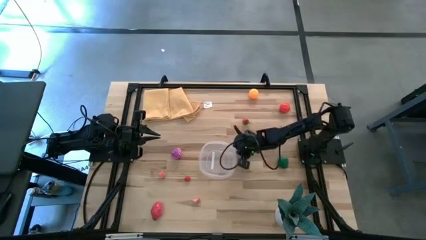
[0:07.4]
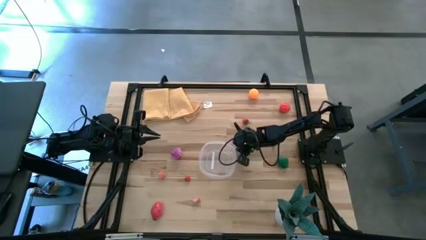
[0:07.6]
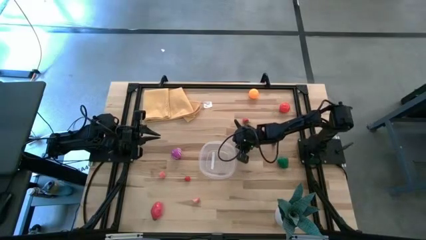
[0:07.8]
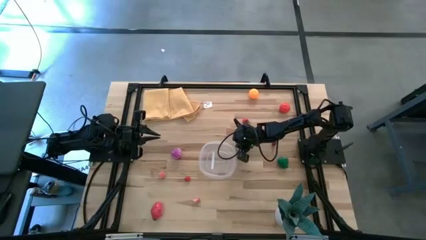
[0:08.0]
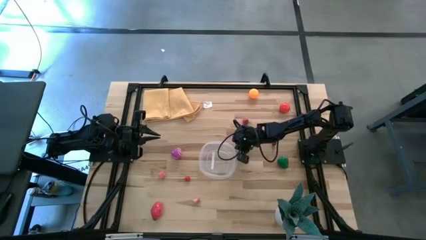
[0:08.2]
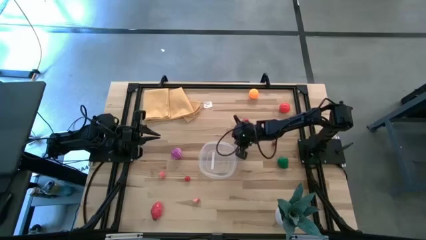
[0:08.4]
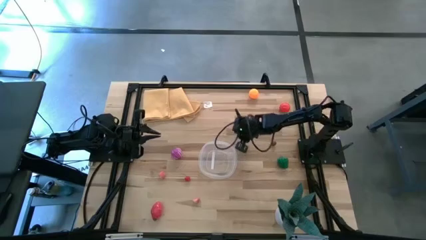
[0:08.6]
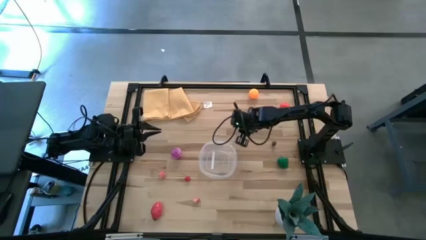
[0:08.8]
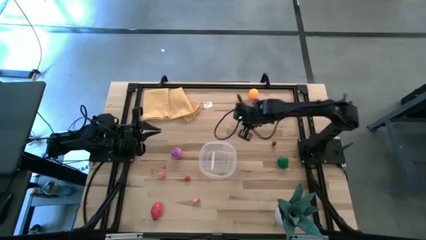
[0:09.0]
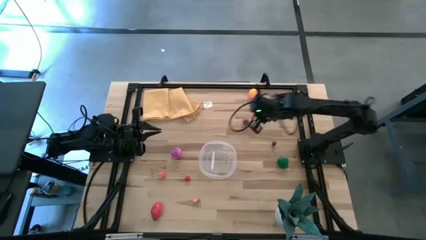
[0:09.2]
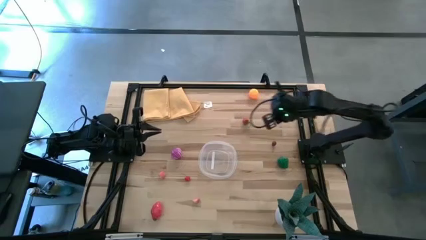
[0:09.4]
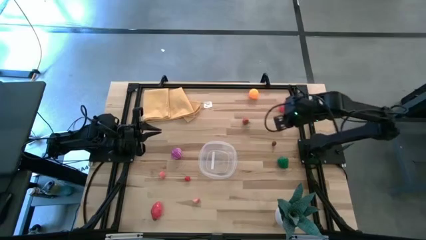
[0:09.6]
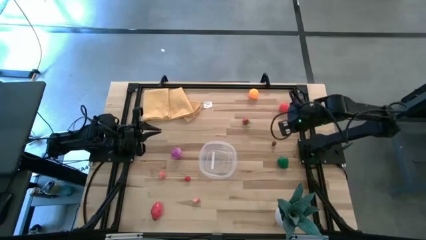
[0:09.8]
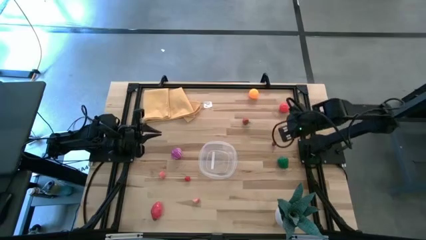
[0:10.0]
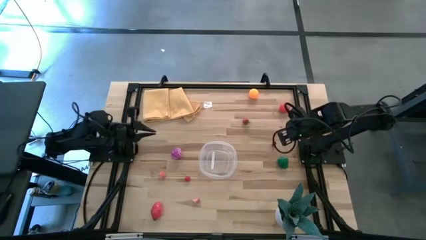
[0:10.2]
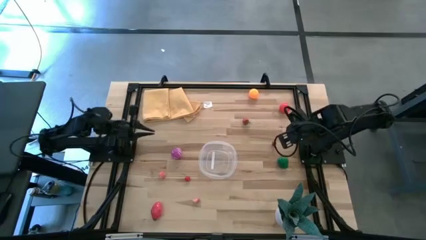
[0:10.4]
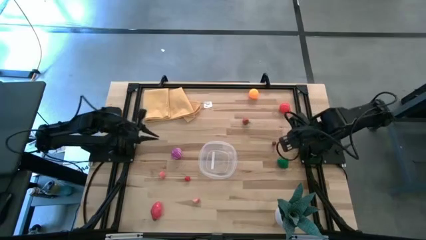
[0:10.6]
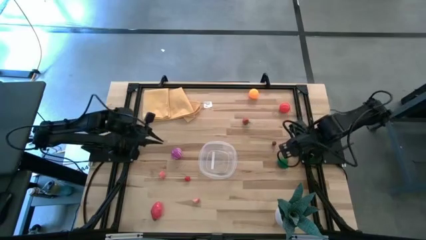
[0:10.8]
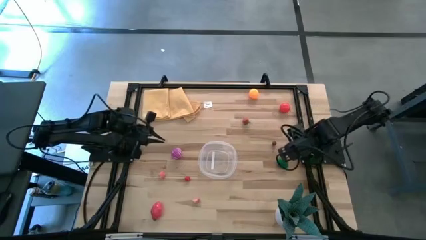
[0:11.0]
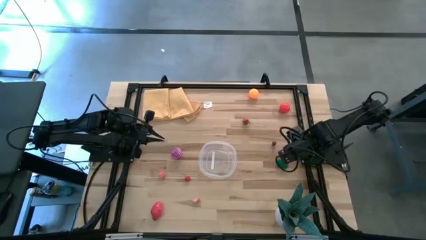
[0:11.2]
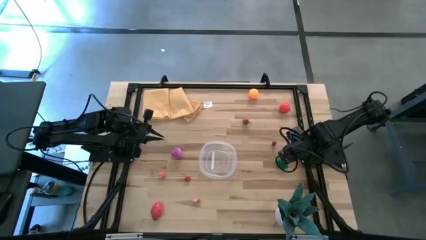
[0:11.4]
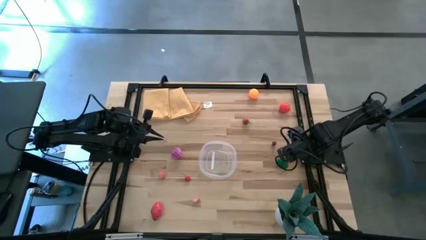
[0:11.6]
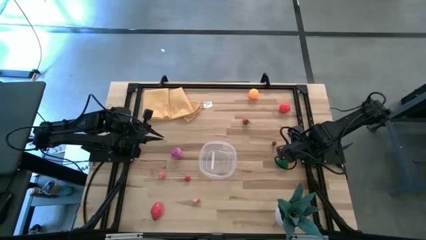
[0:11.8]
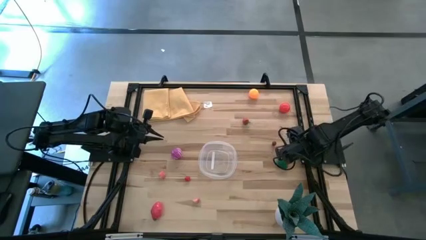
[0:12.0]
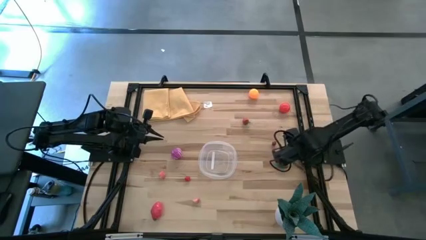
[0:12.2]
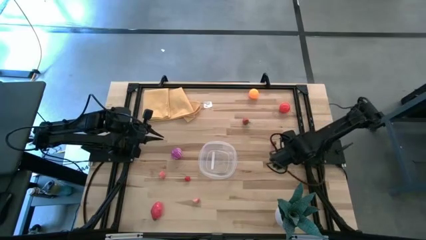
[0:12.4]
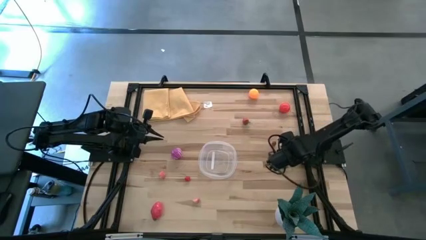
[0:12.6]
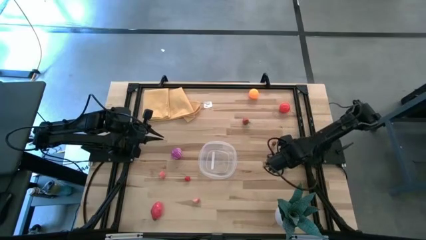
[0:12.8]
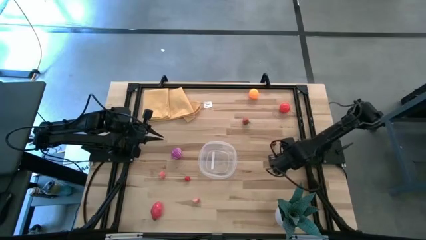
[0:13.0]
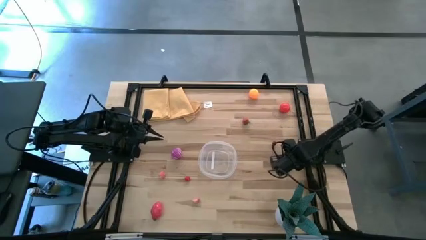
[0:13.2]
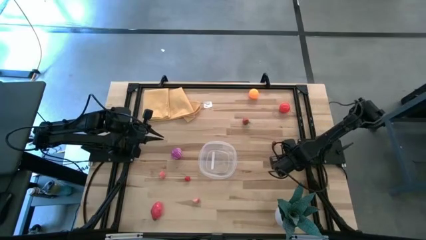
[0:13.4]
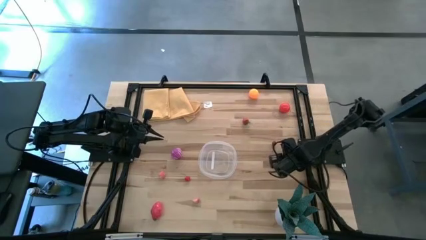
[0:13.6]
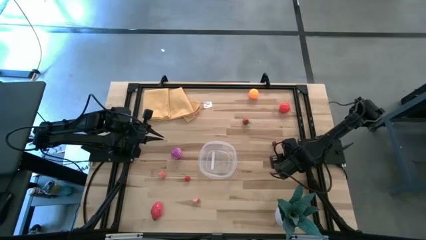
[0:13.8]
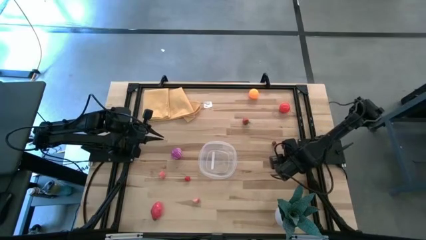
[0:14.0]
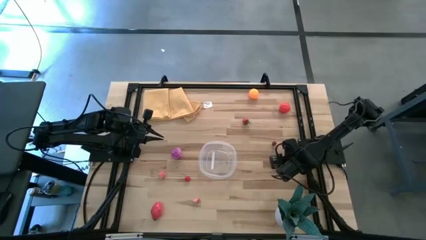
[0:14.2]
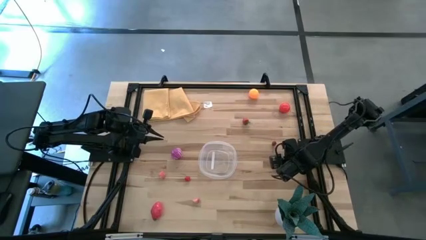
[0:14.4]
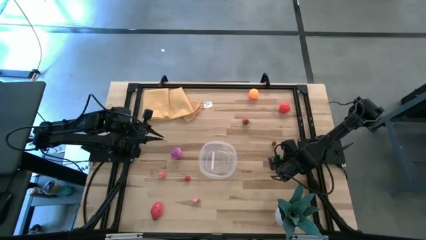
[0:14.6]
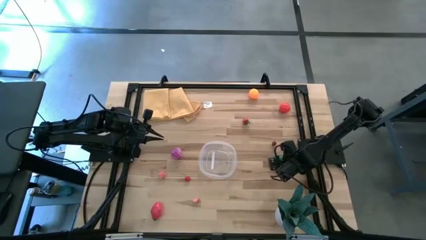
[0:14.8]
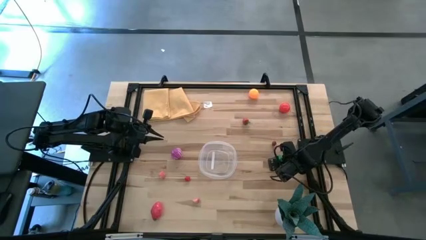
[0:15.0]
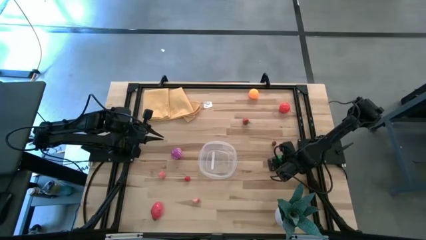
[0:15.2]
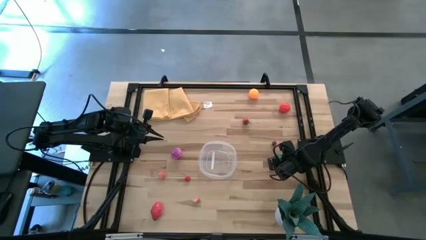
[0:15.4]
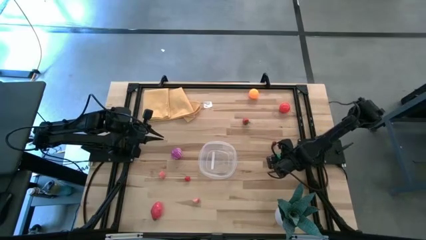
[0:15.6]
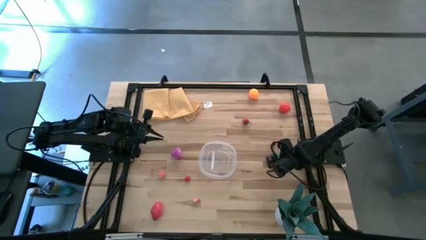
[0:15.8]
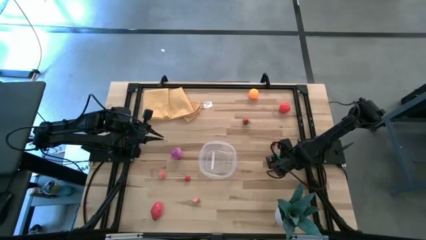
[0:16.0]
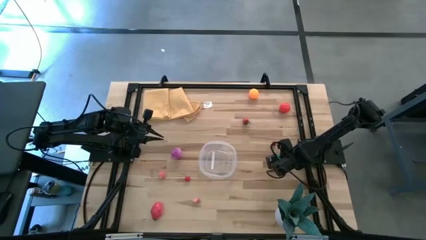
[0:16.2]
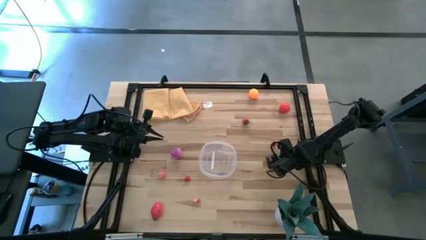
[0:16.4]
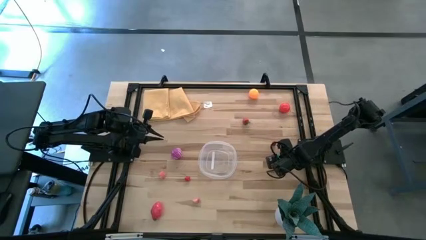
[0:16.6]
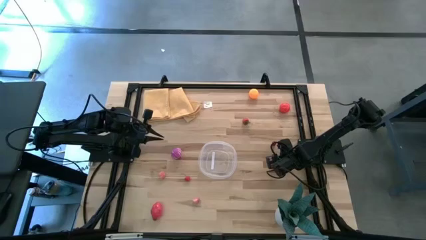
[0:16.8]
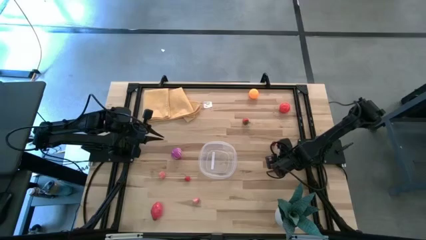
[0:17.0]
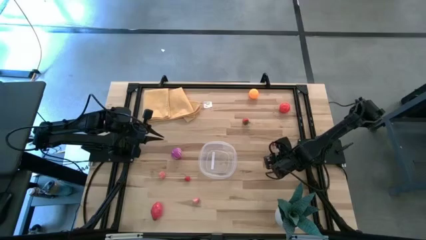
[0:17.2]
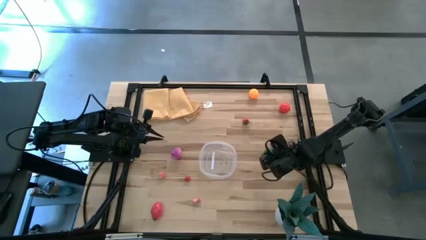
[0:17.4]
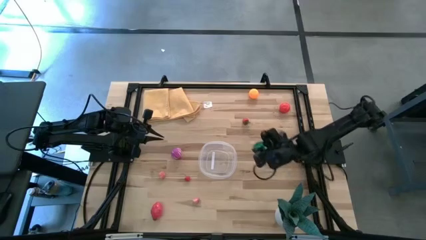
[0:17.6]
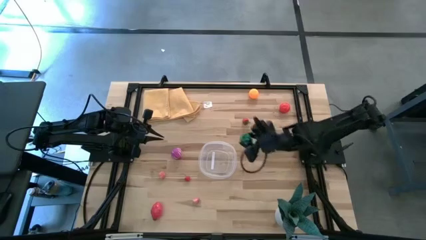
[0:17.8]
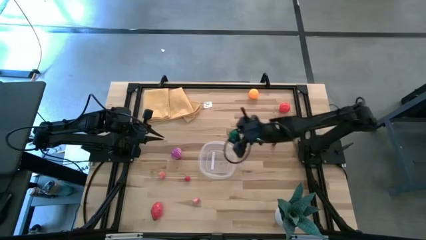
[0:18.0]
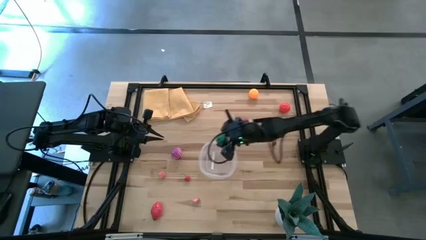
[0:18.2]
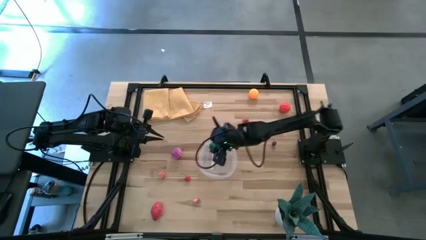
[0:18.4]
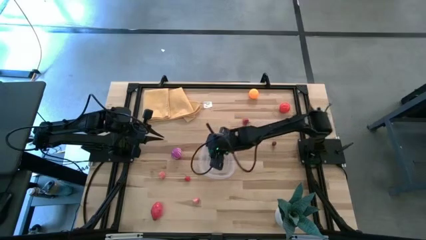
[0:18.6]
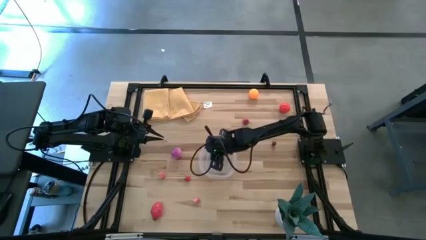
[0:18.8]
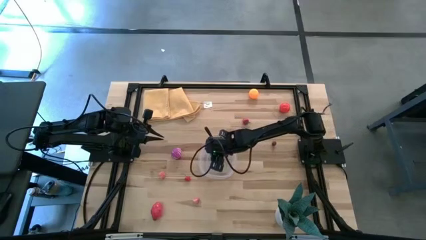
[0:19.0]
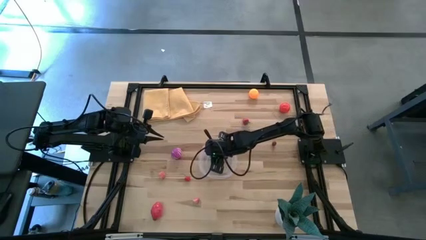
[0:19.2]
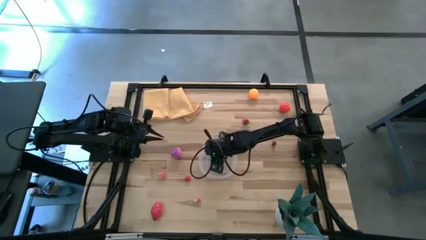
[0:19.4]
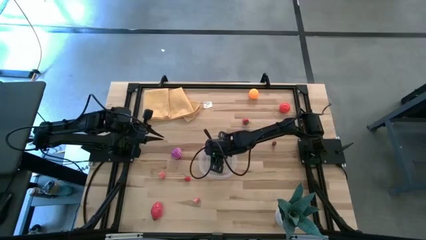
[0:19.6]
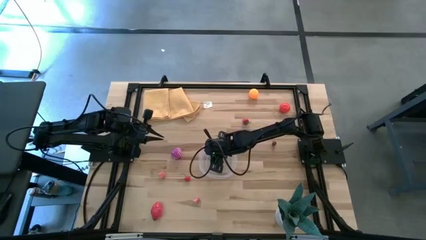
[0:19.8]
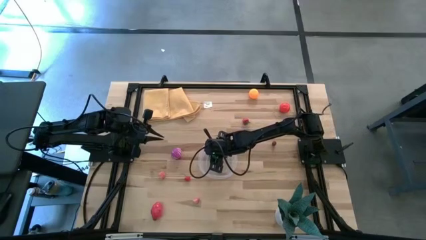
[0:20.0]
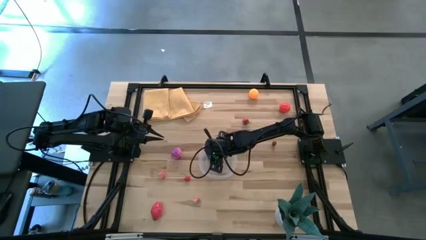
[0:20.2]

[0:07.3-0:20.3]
Task: Pick and placing Produce into tupperware
Put the green bell pepper into the transparent bin

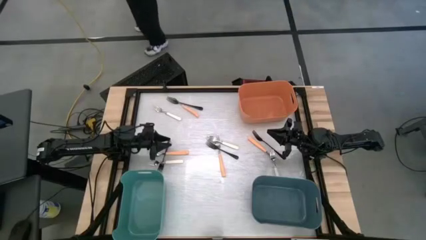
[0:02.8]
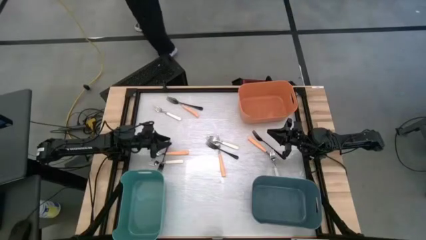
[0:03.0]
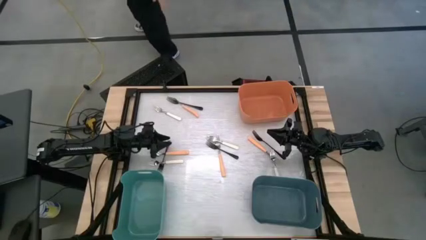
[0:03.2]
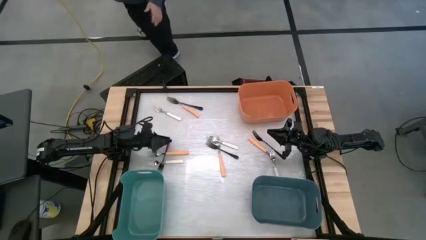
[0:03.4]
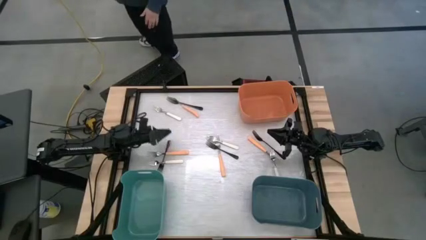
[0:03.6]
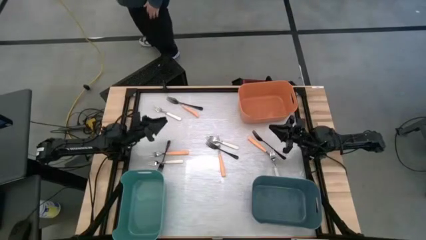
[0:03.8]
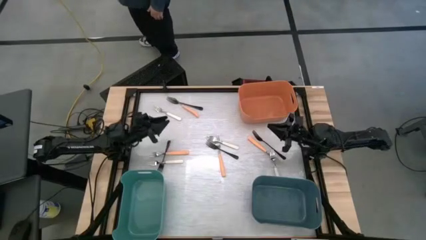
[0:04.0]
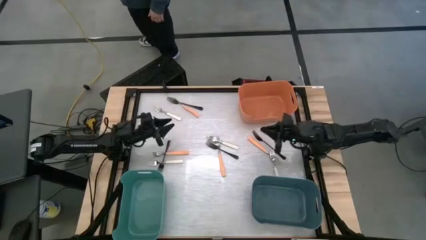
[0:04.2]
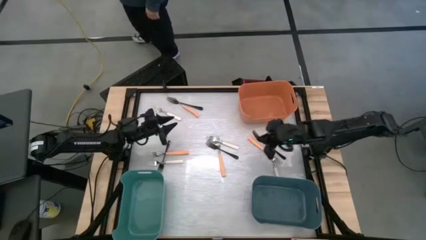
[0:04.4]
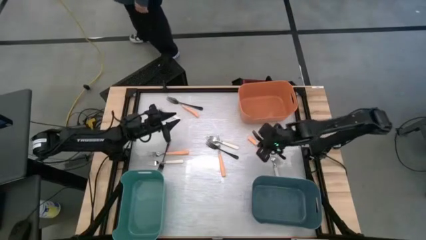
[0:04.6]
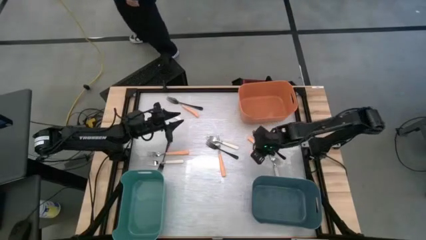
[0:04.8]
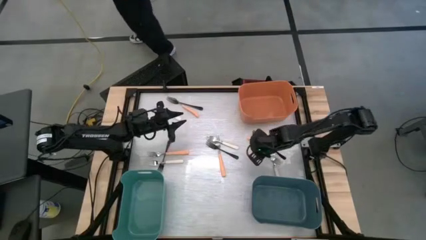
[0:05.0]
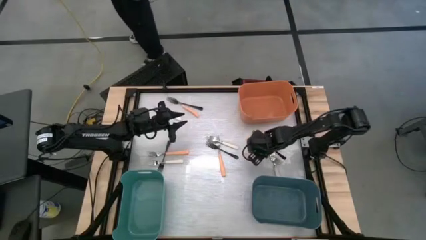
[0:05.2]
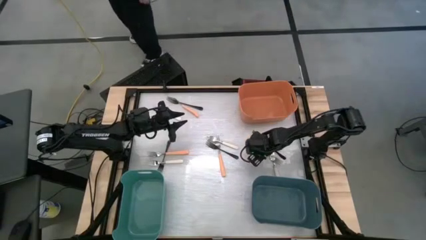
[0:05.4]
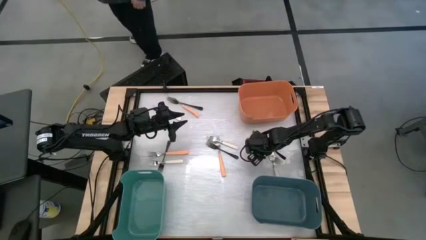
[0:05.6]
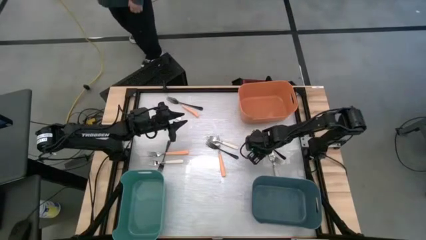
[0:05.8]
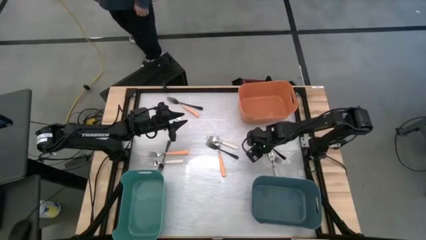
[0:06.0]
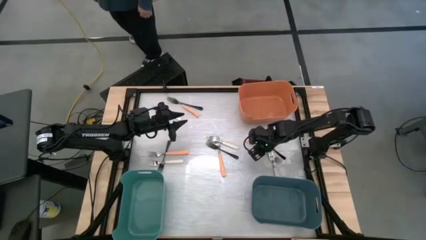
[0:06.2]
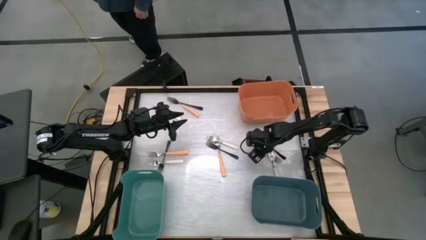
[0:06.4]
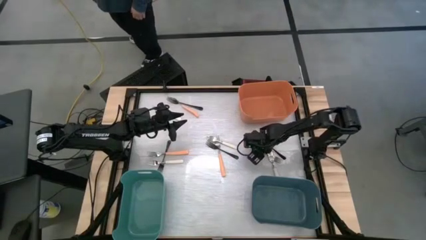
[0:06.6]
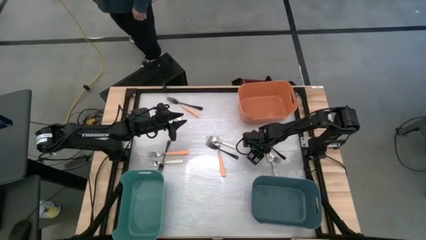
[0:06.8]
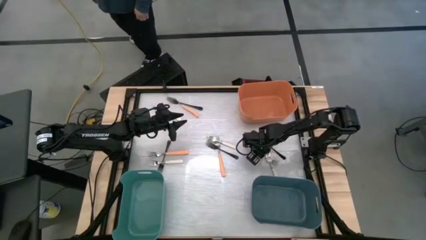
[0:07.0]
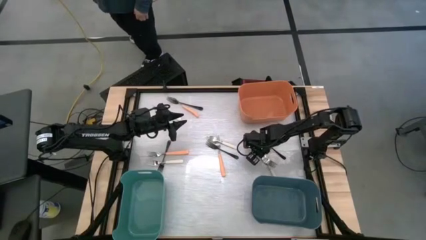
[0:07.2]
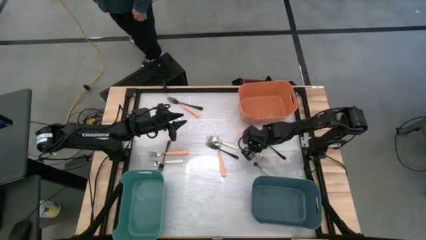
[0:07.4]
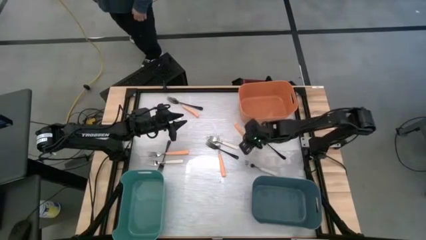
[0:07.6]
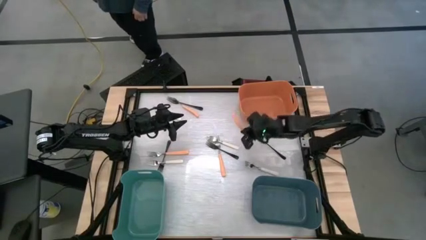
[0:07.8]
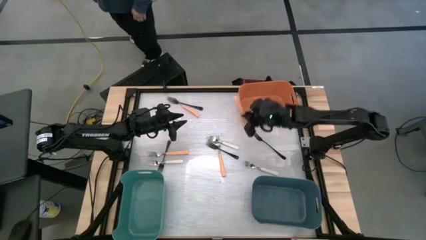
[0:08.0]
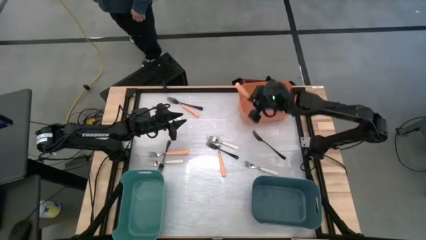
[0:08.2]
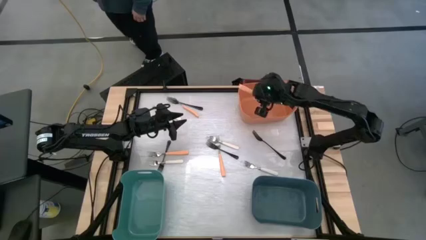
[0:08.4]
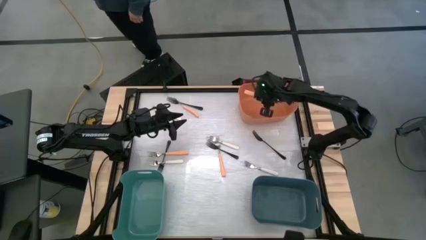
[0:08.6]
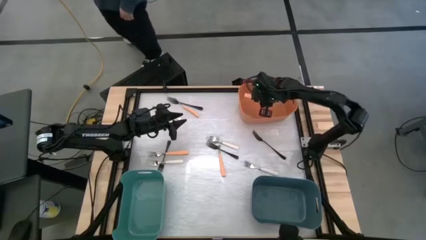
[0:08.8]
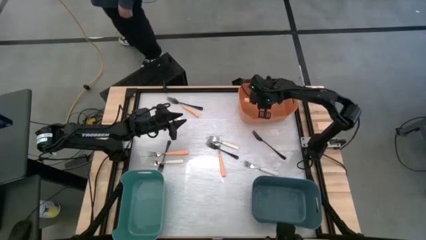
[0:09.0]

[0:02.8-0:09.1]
Task: Sort silverware by color (type)
Put the orange fork into the orange bin
